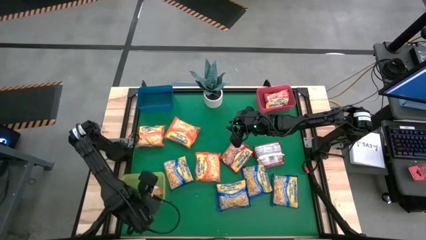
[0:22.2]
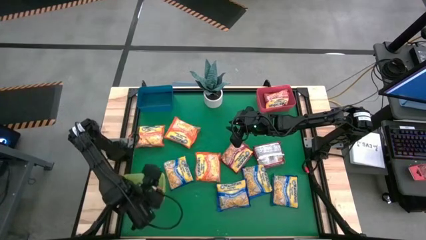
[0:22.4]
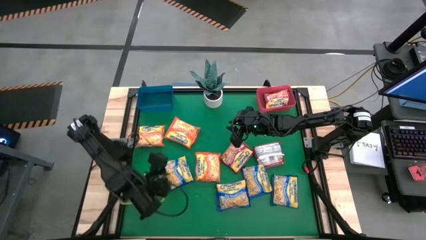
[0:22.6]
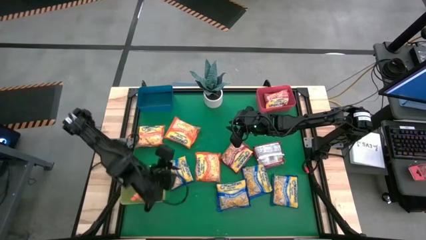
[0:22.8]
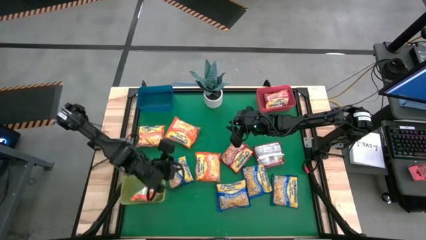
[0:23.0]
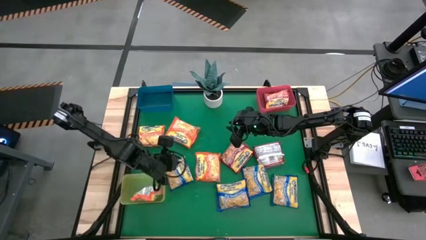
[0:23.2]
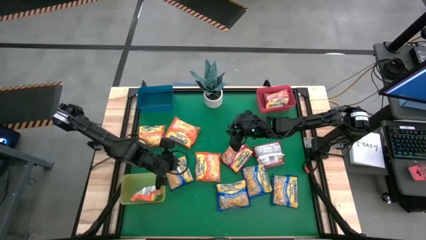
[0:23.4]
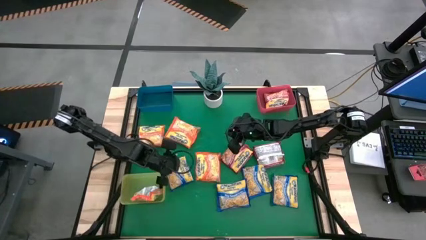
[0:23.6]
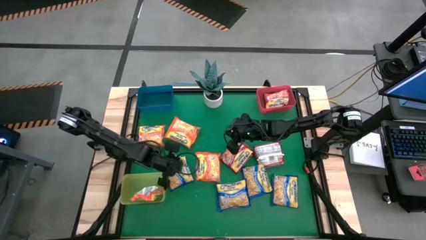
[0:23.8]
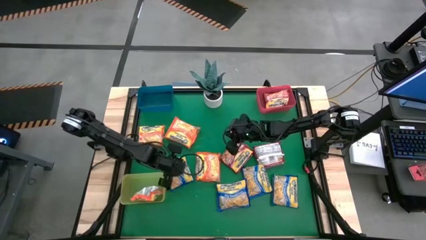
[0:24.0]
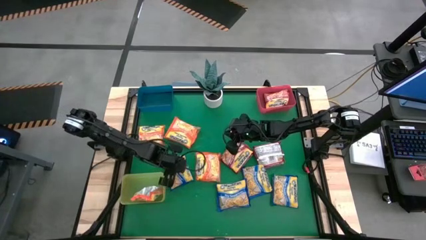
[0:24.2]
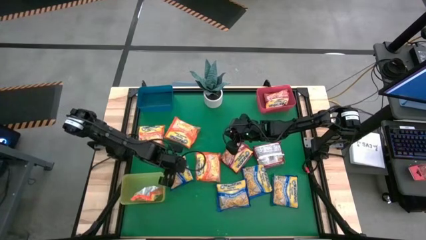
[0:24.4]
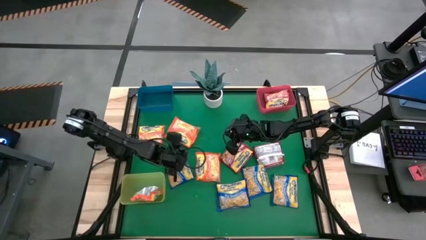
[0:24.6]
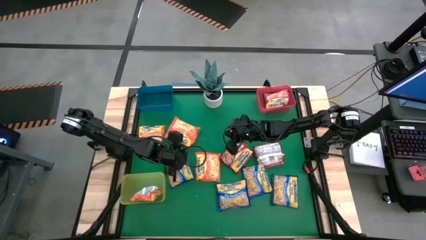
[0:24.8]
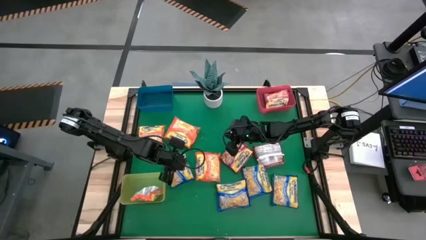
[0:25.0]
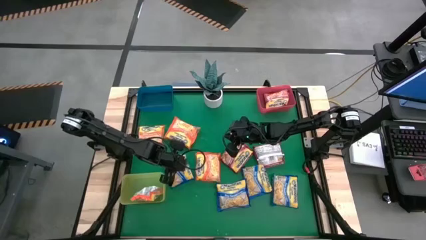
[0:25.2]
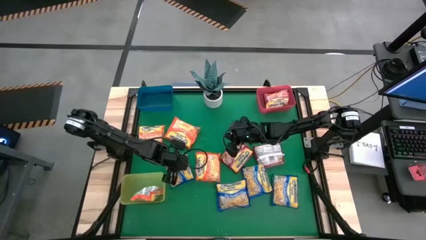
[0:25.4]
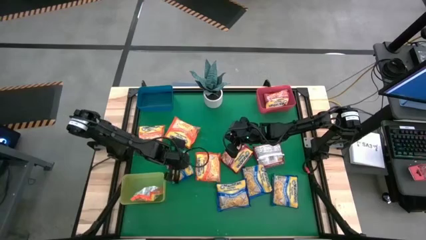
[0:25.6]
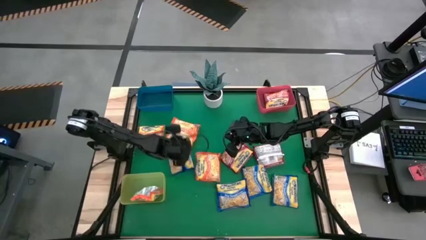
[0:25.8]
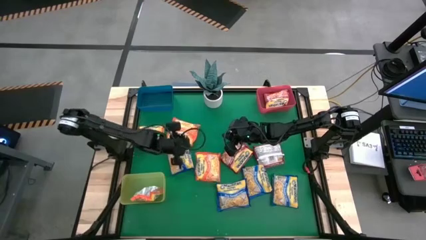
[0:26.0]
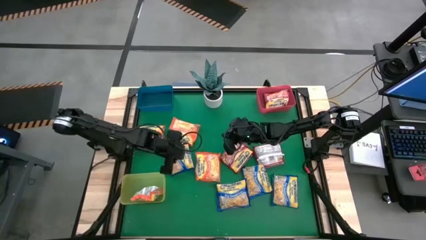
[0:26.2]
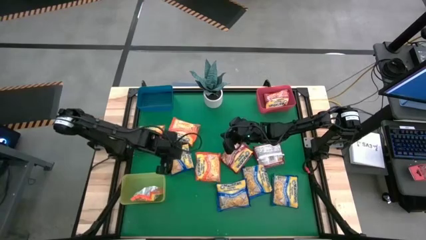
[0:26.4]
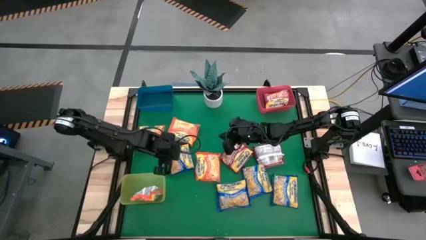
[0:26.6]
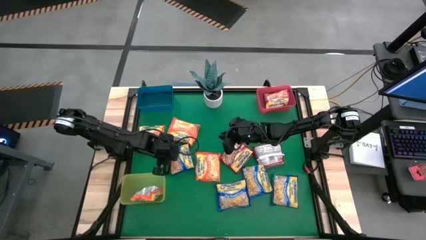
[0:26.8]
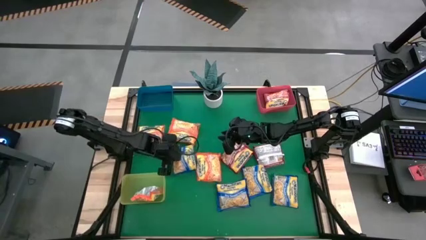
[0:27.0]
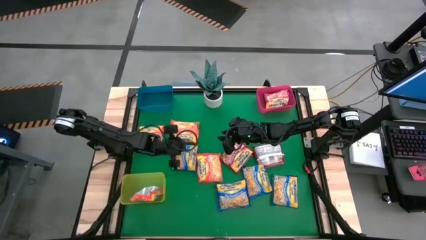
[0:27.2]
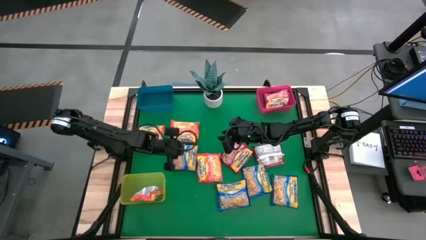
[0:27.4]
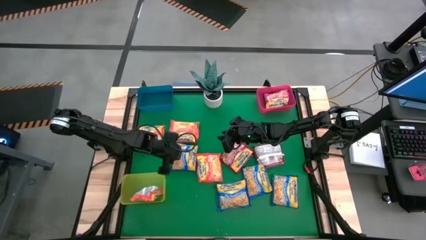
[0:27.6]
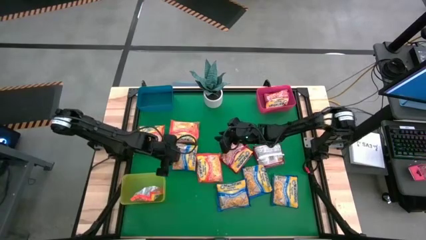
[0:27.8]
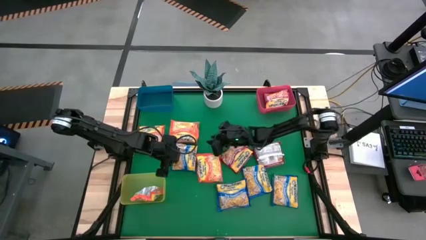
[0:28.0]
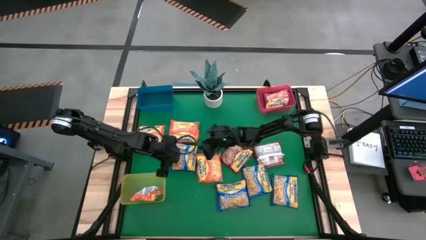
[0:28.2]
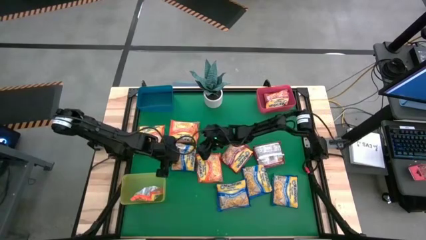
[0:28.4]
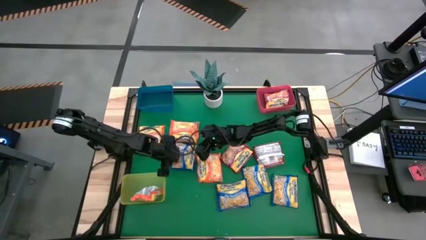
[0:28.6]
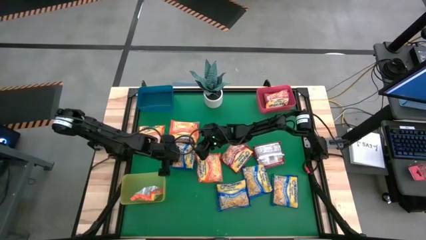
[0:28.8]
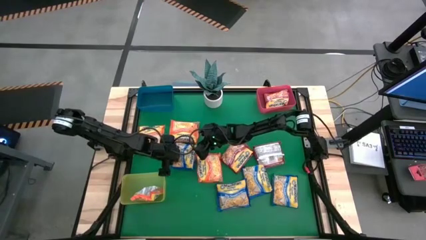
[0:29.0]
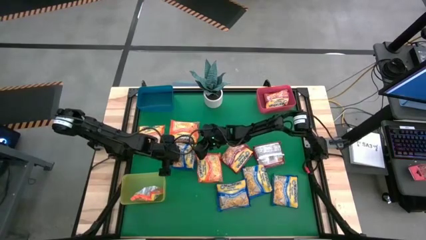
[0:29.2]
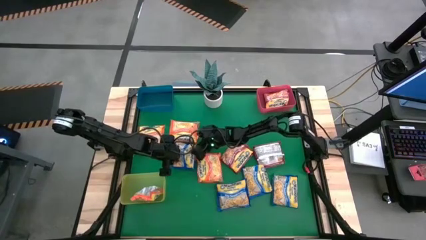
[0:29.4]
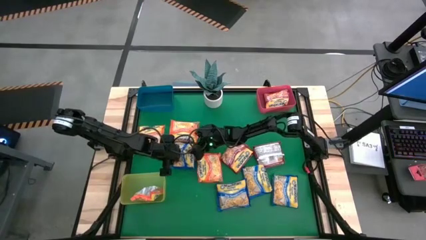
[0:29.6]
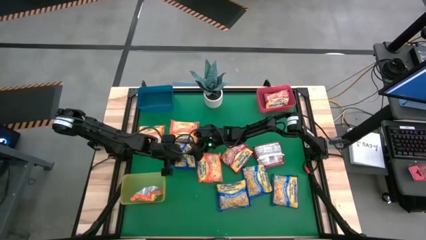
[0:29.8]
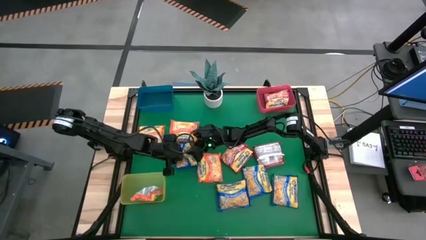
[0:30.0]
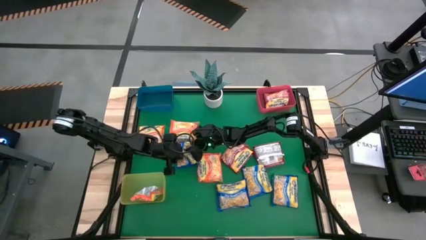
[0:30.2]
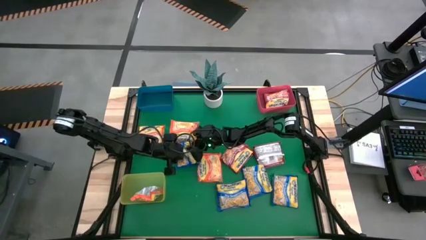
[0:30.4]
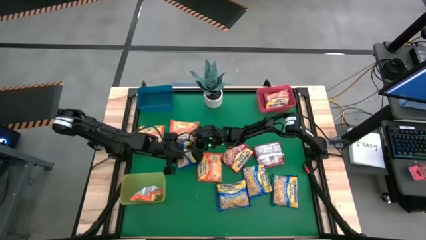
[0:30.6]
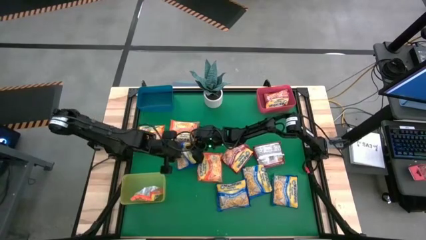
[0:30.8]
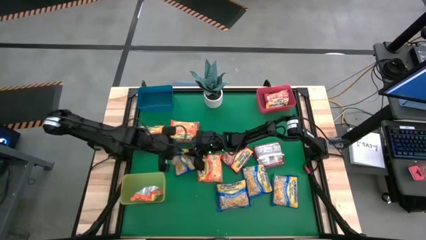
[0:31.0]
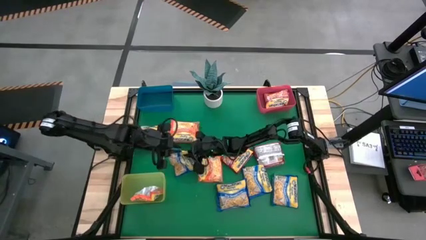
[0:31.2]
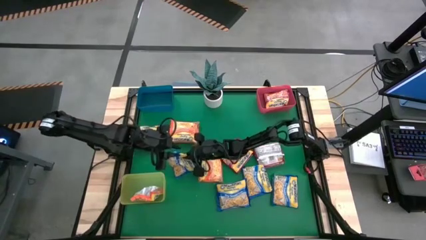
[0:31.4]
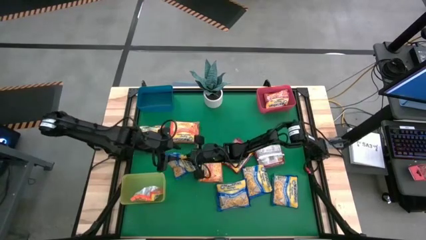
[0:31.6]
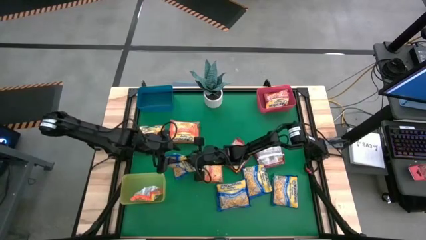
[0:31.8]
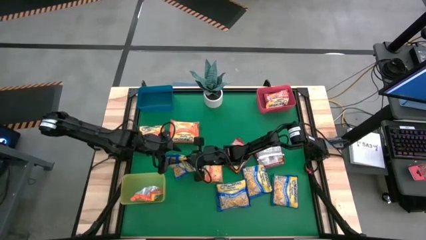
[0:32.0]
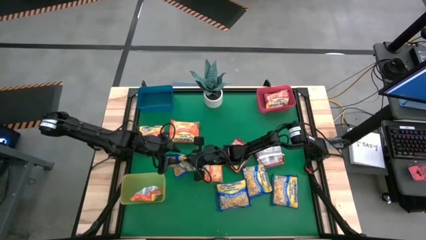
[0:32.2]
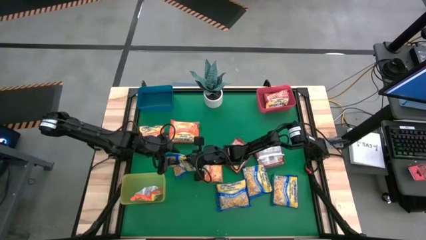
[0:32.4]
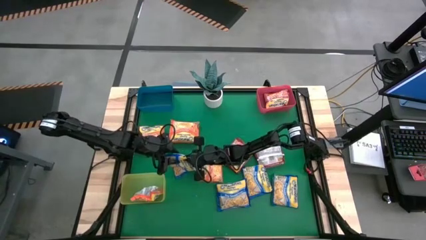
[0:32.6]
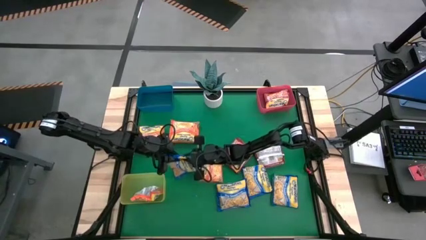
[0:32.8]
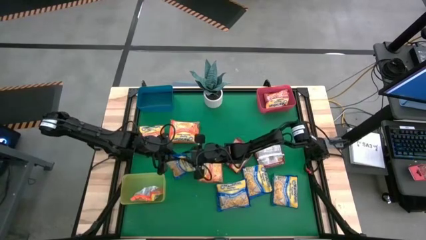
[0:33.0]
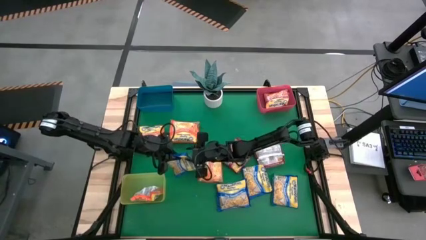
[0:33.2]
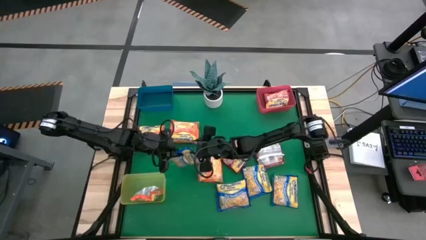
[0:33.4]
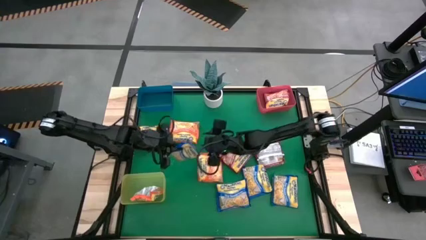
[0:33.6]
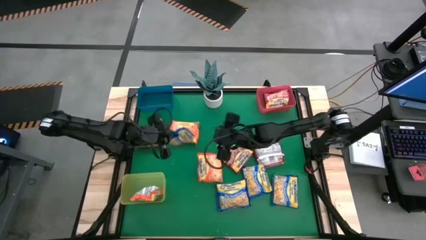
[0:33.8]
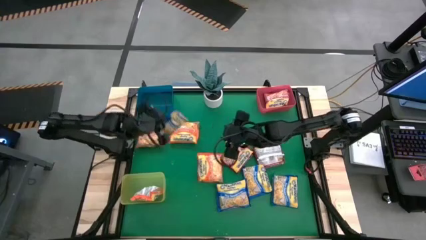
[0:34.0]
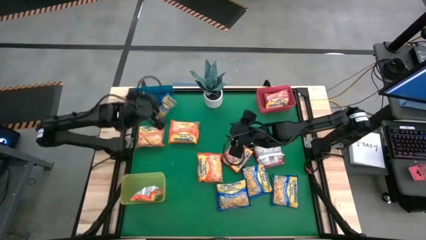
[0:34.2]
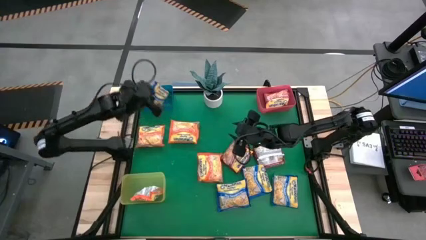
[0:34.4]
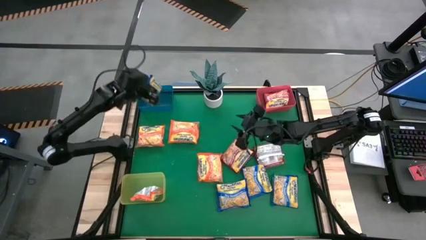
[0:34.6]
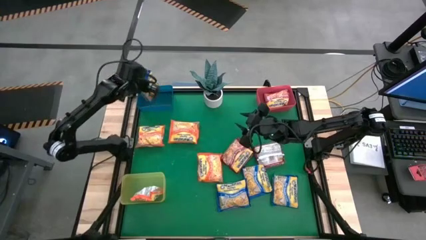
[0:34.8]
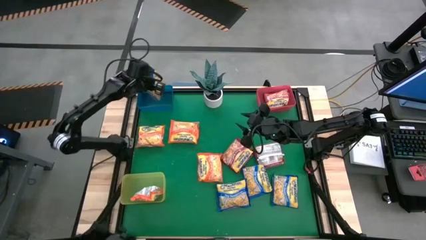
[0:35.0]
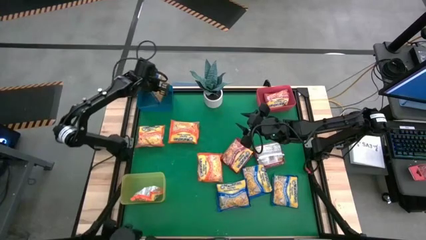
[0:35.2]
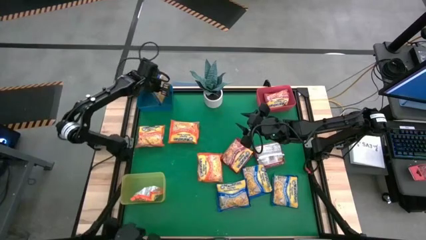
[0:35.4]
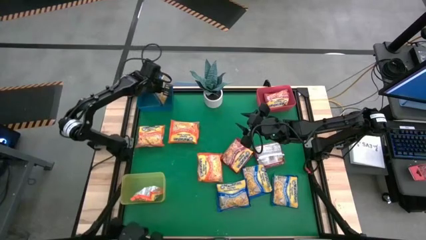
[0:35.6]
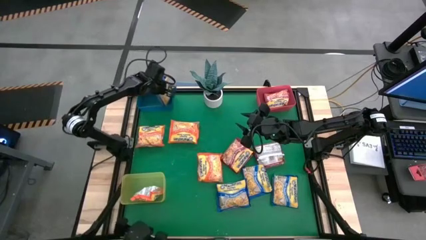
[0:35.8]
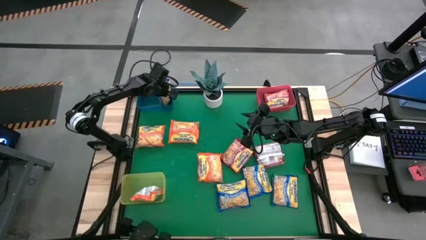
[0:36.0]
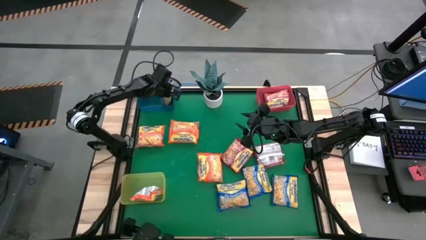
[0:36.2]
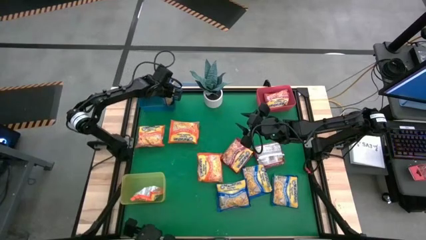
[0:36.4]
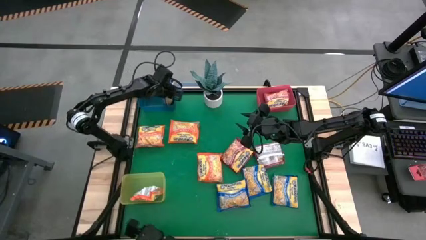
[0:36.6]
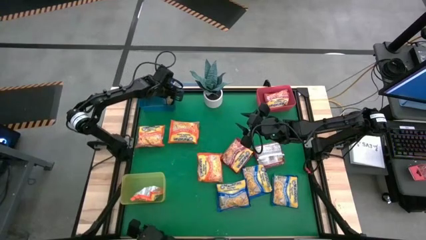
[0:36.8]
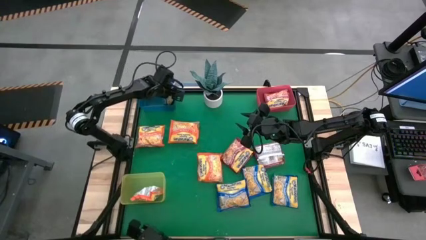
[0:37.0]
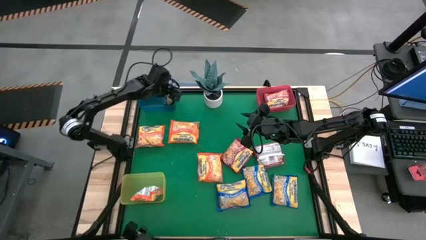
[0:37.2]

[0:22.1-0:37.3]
Task: Sort Maruchan noodles
Put the blue noodle pack into the blue bin
